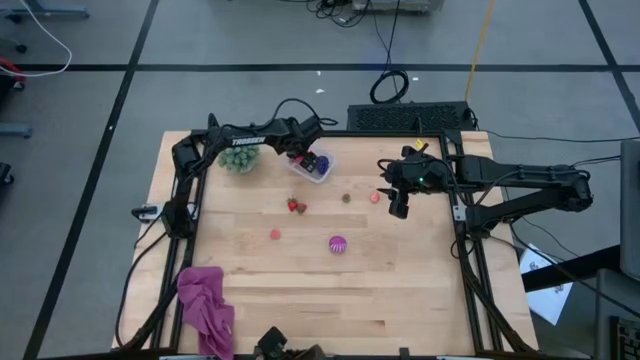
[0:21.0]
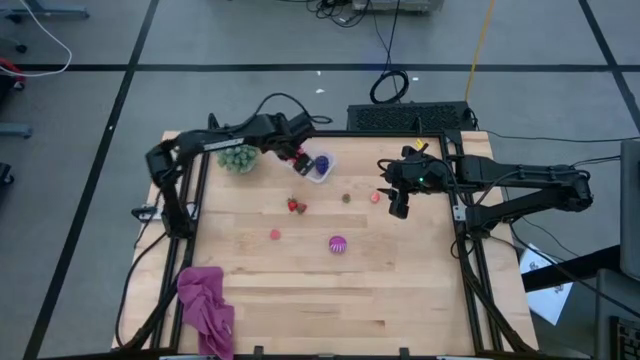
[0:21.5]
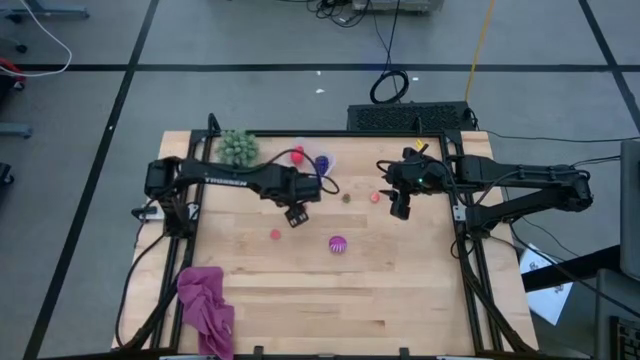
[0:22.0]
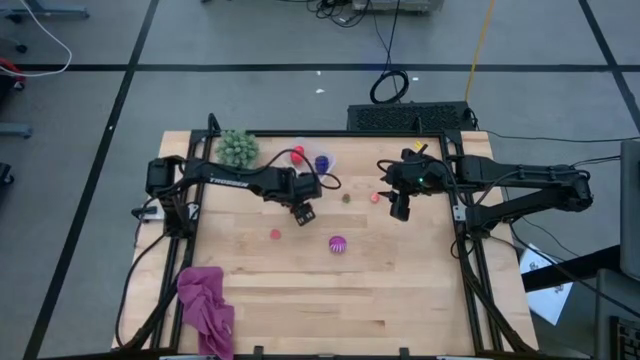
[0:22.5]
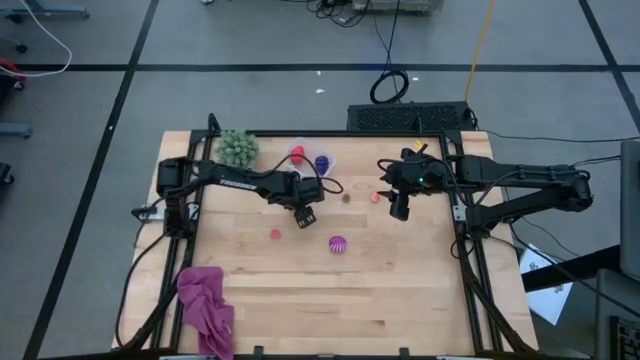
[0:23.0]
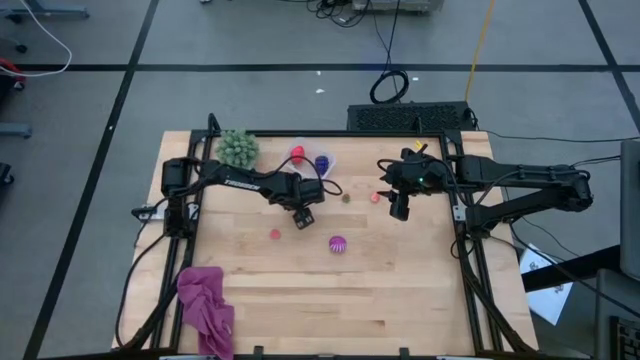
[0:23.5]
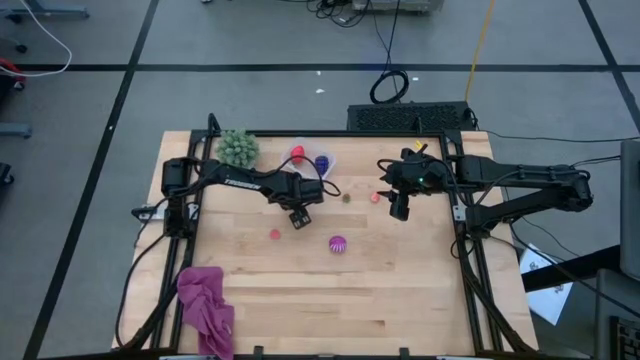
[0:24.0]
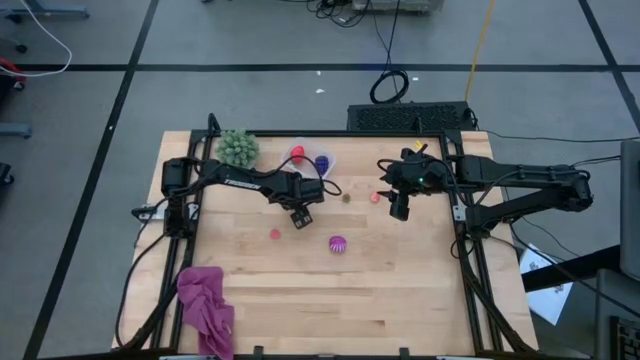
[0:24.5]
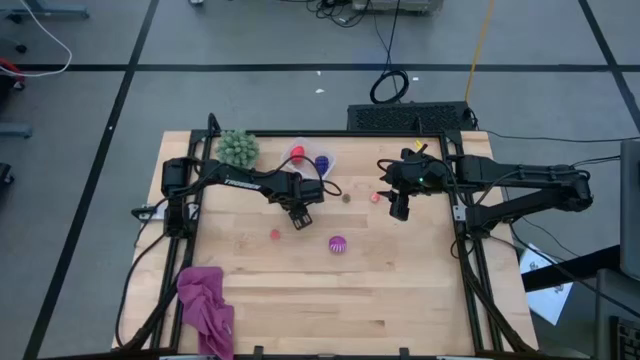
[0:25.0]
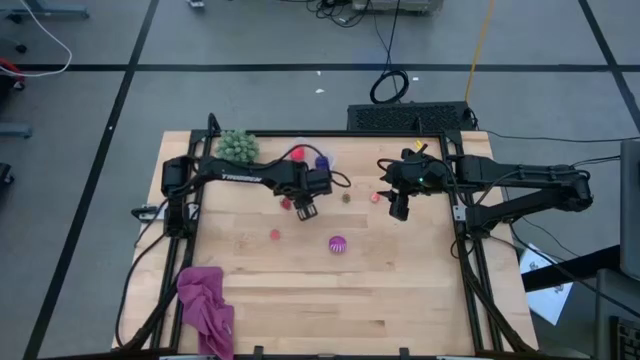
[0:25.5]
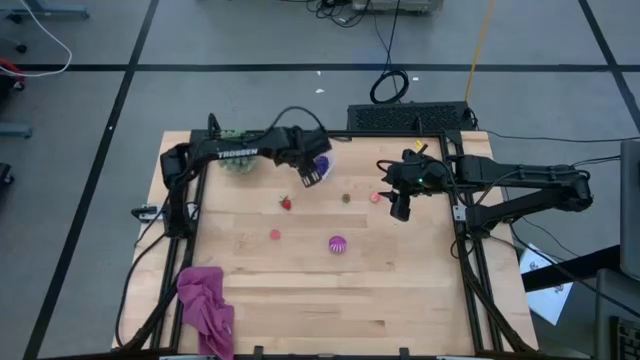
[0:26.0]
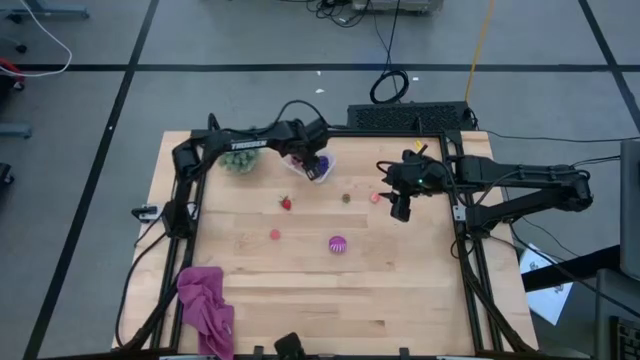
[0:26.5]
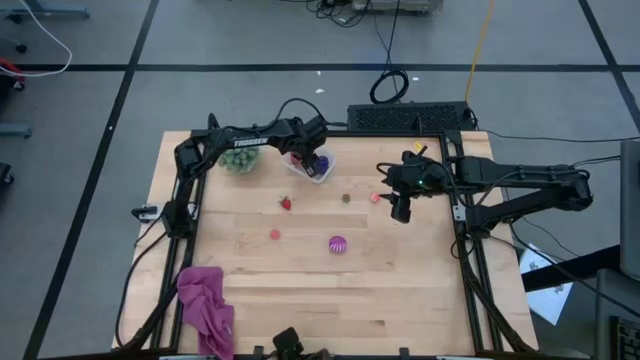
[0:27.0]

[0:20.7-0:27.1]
Task: Pick and placing Produce into tupperware
Put the middle red strawberry into the transparent bin

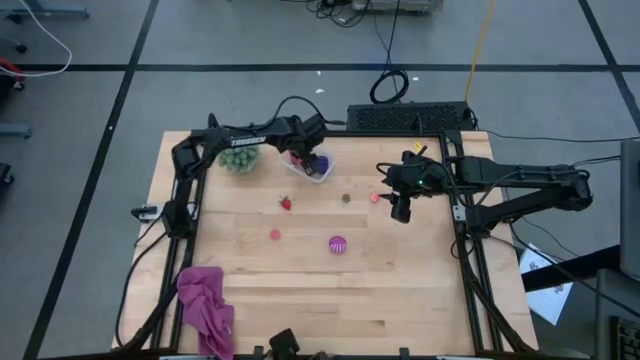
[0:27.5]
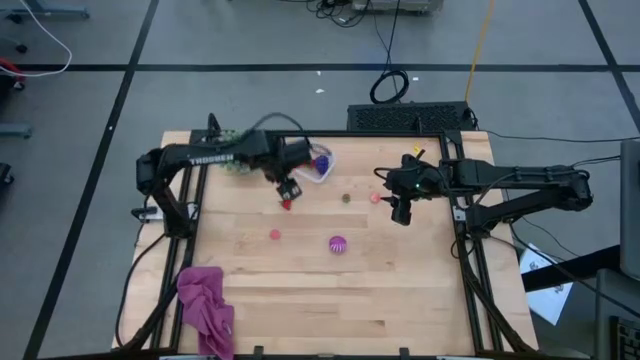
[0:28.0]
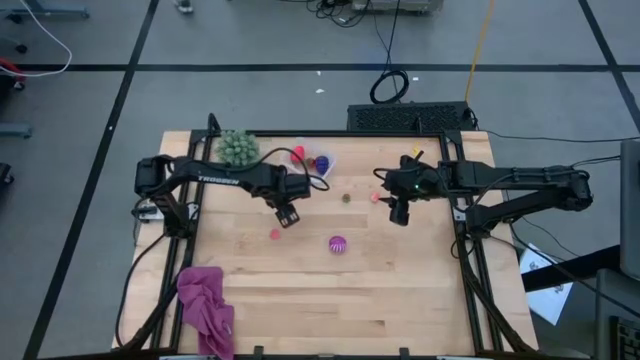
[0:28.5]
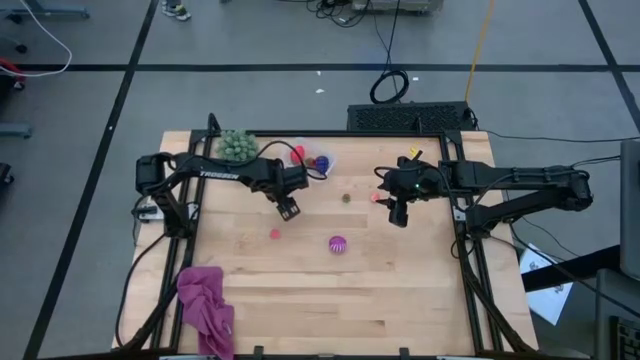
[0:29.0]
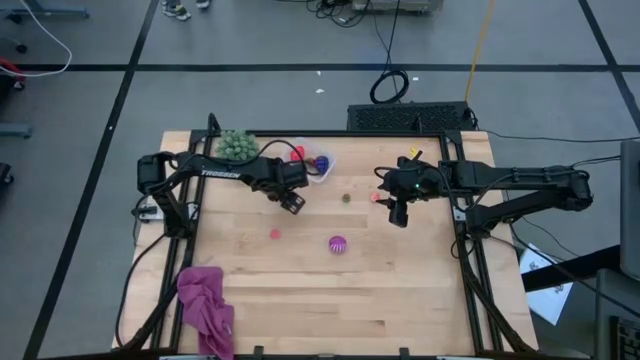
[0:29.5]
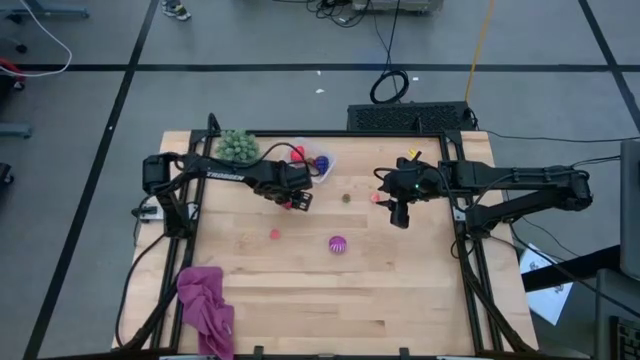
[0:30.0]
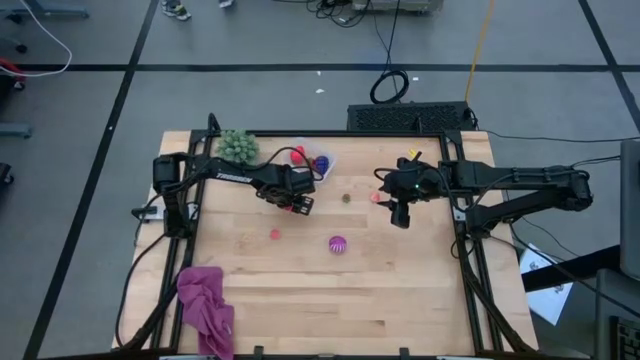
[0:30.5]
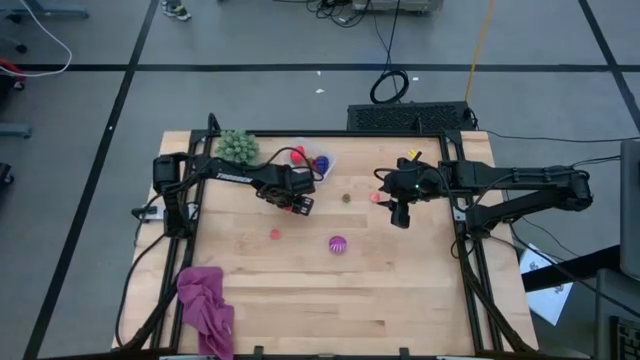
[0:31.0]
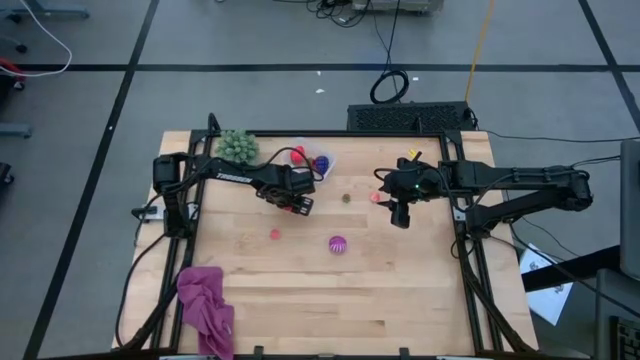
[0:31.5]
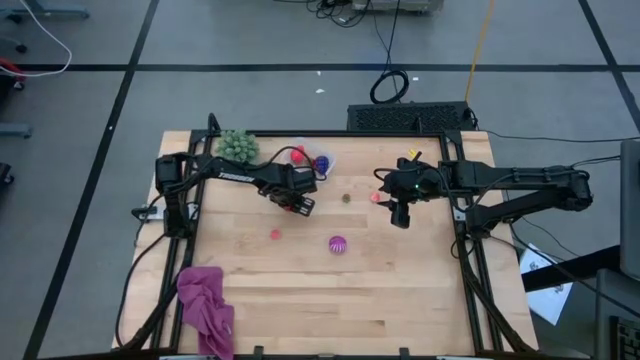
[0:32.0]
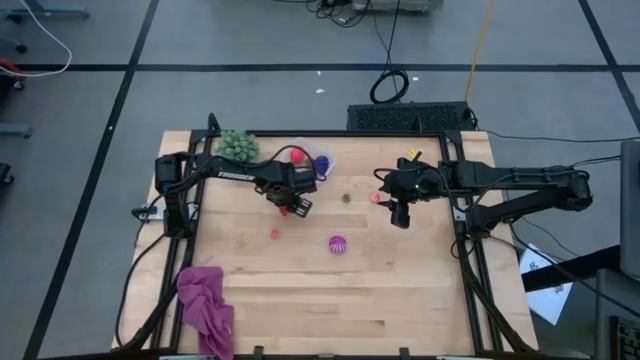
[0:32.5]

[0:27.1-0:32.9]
Put the left red strawberry into the transparent bin

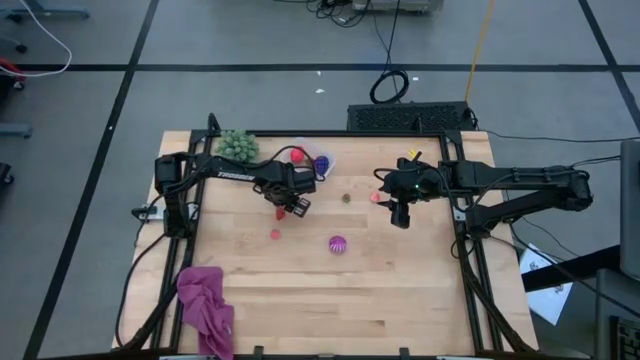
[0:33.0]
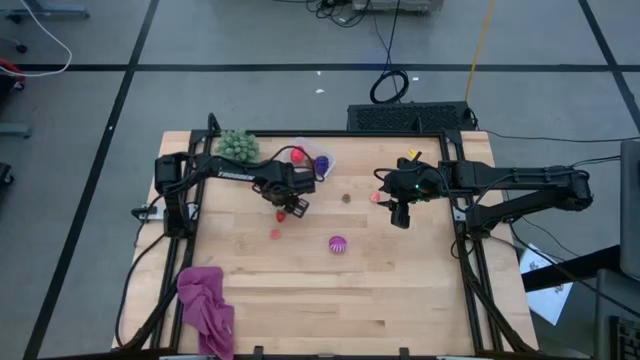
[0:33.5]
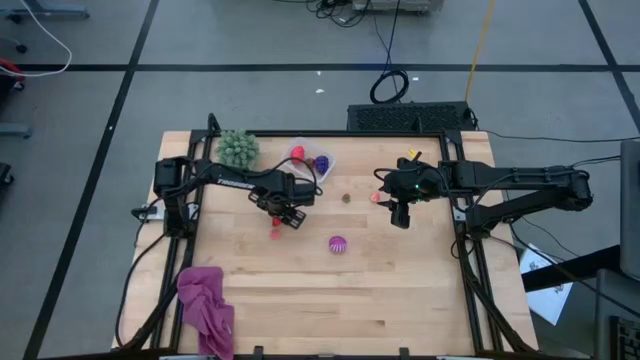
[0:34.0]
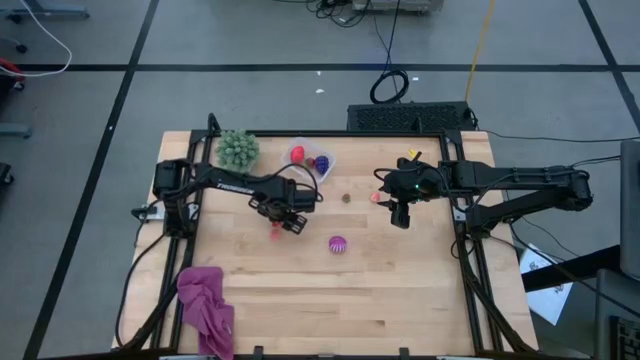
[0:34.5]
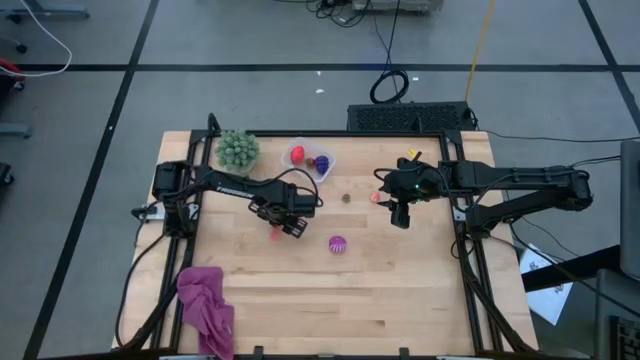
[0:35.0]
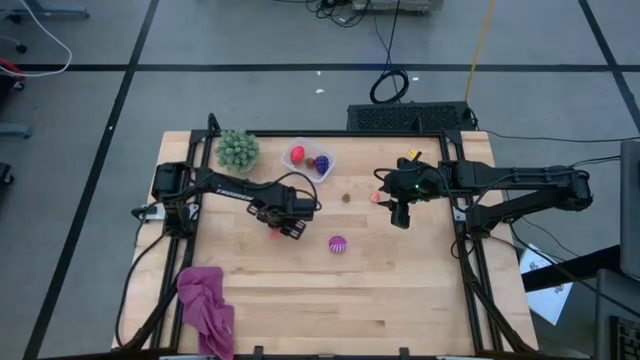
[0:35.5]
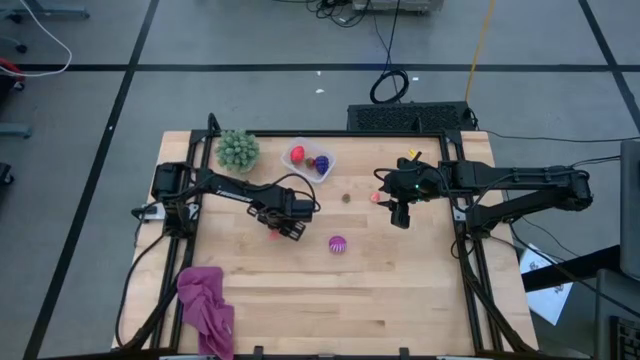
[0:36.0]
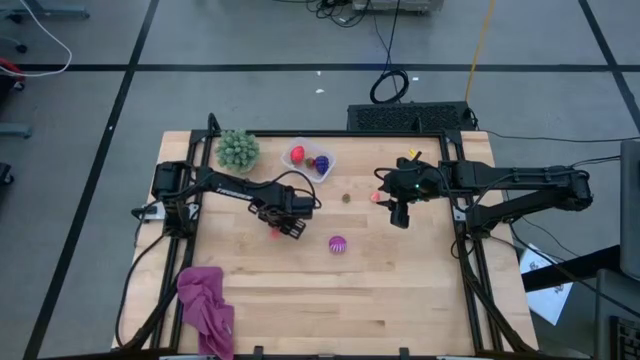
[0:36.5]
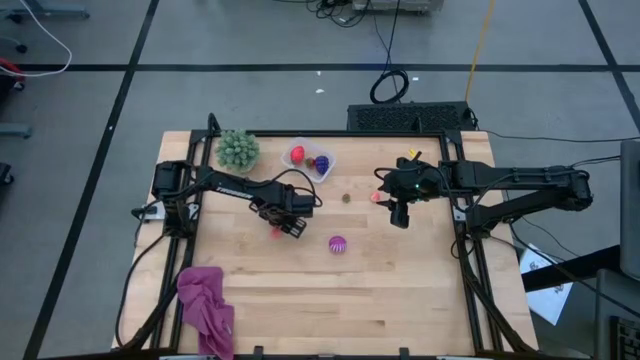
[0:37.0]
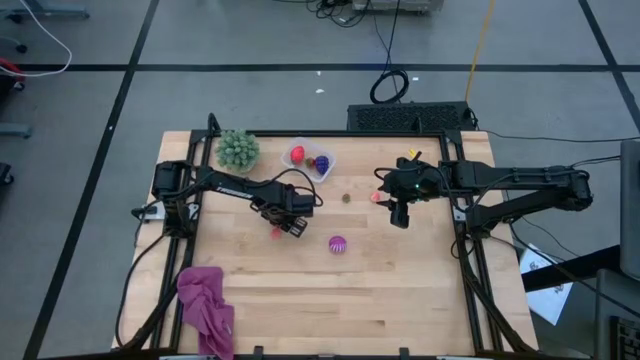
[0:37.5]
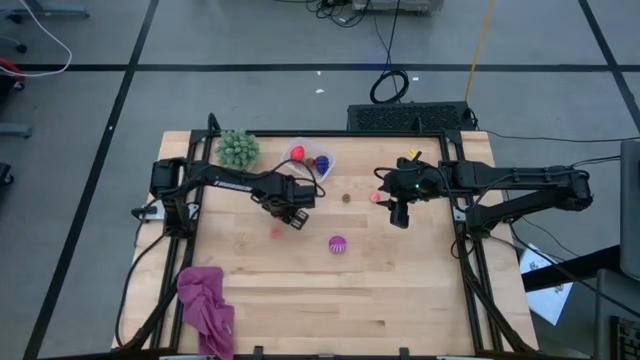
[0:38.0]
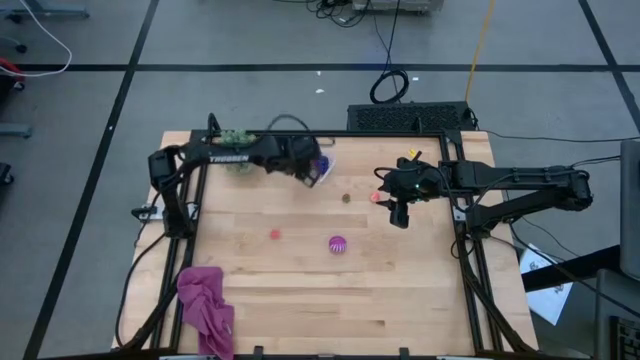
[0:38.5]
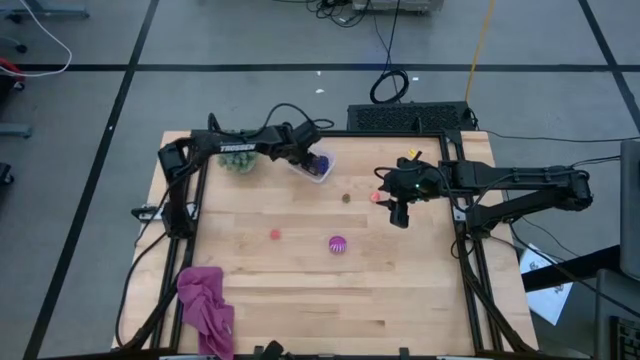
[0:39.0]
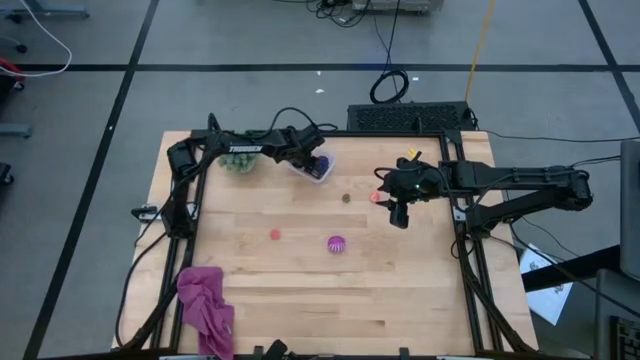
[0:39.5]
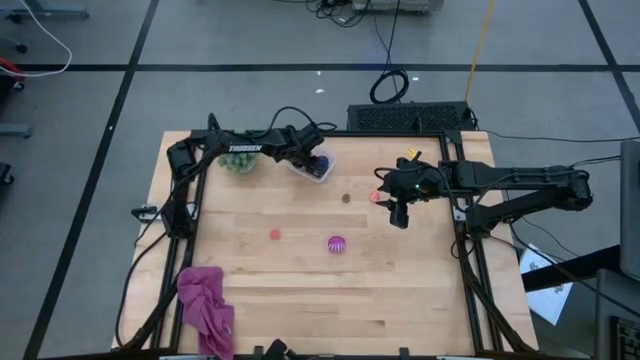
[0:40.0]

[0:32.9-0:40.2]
Put the left red strawberry into the transparent bin
